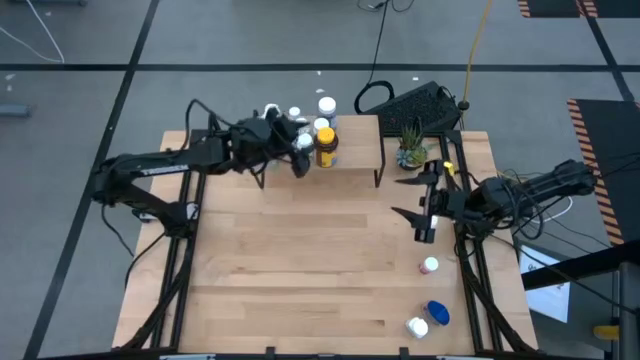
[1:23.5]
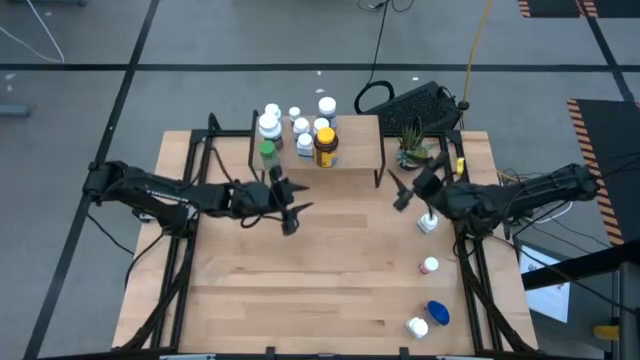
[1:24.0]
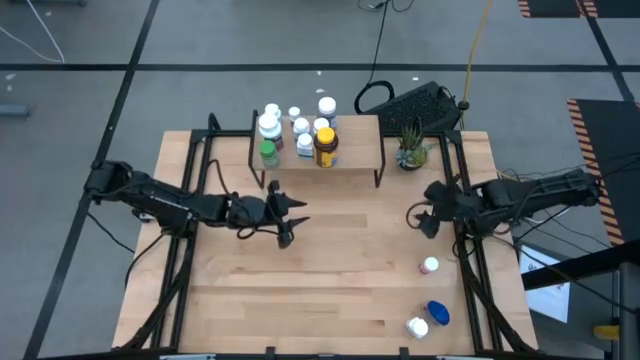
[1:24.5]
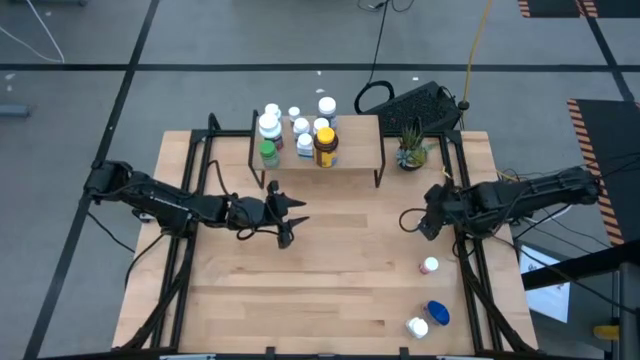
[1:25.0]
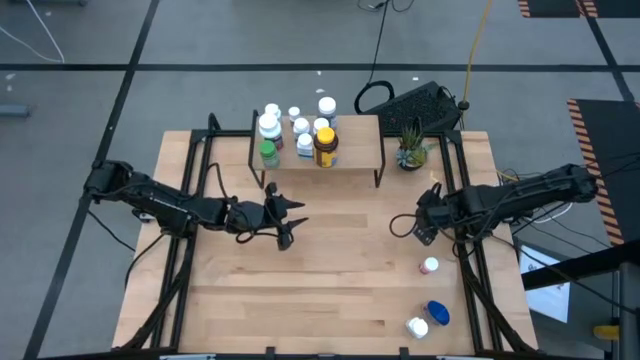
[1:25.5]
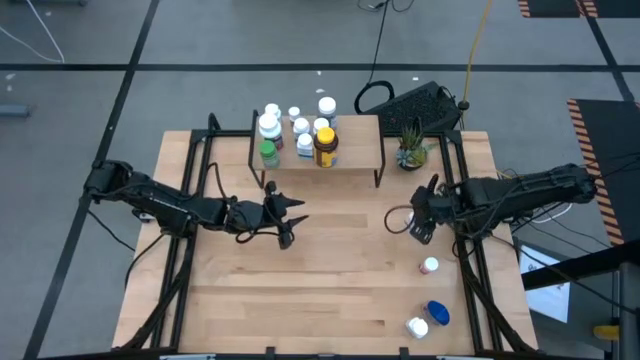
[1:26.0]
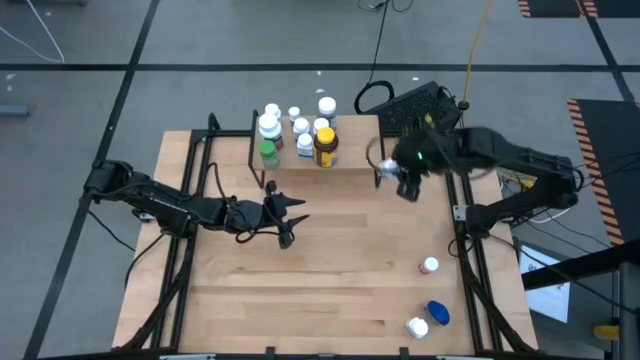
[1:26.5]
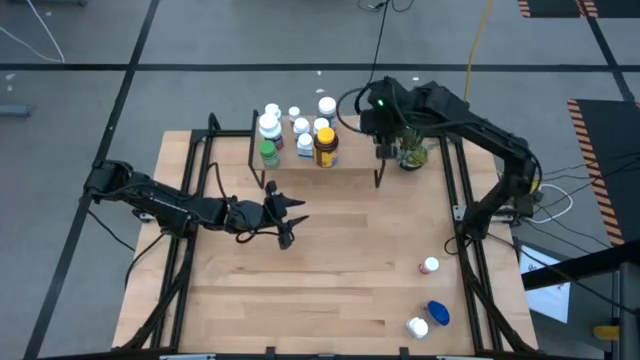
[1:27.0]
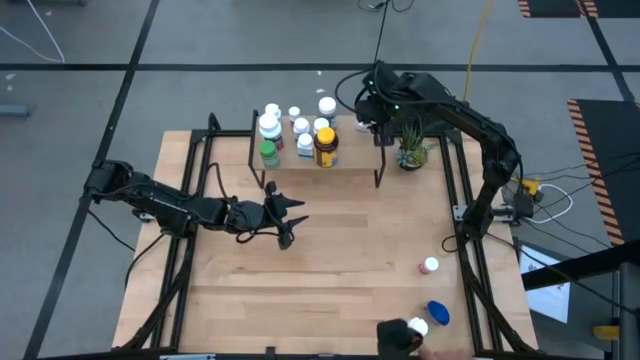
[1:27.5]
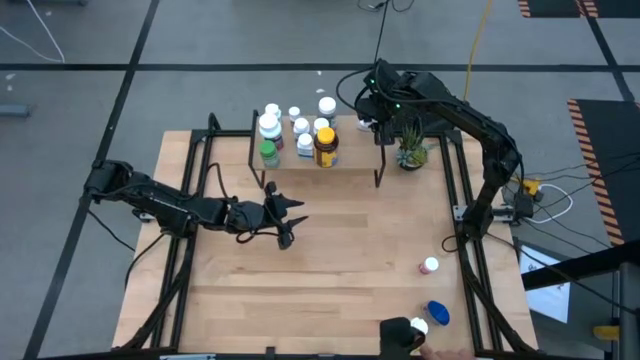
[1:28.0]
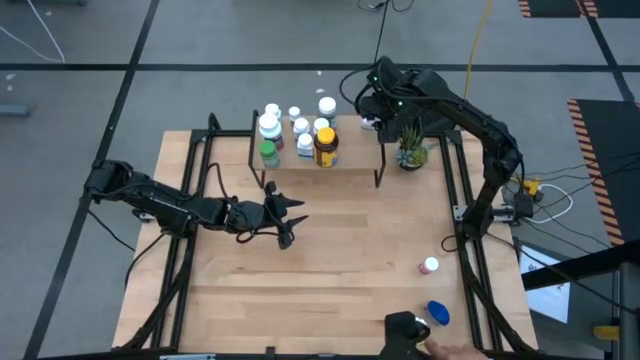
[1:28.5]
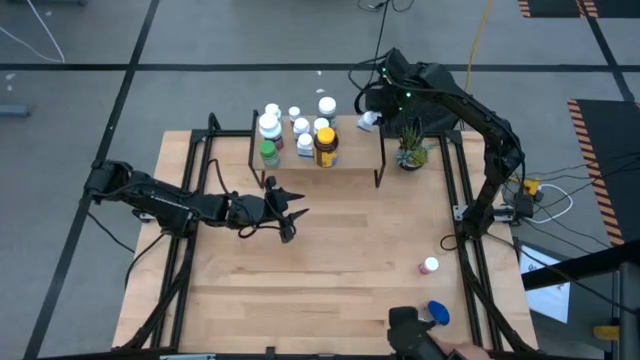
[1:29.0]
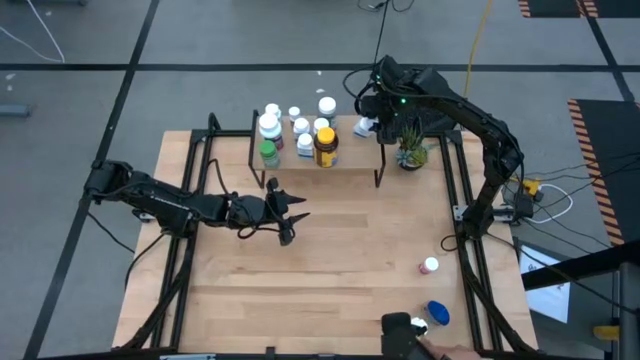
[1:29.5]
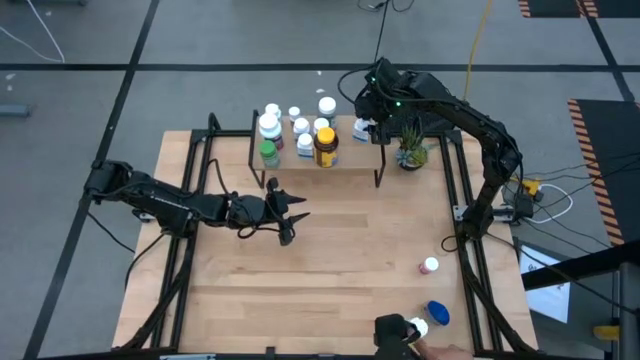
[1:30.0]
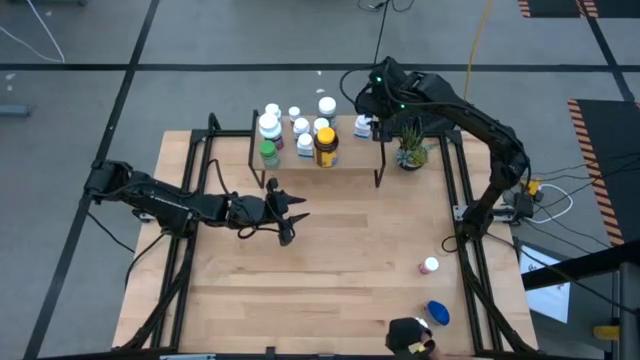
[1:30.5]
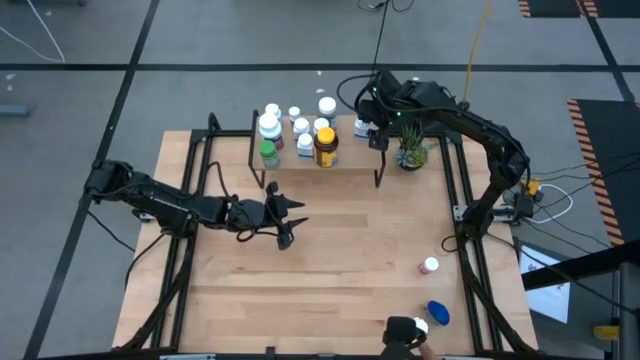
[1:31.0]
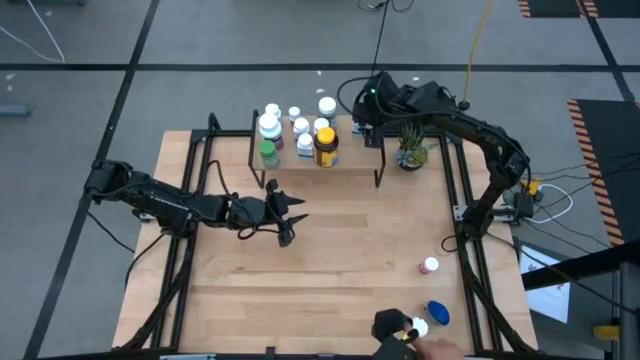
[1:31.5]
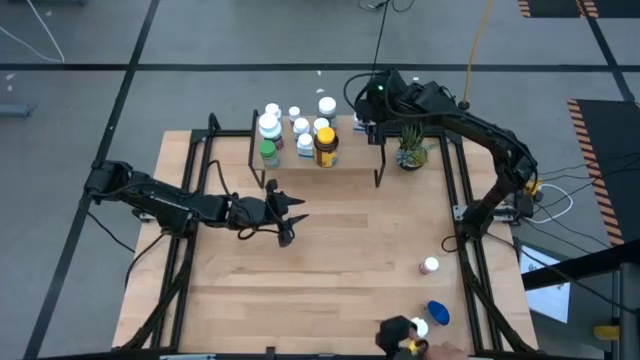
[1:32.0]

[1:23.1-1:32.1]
Task: Pick and place medicine bottles onto shelf by color
Put the white pill bottle on the shelf

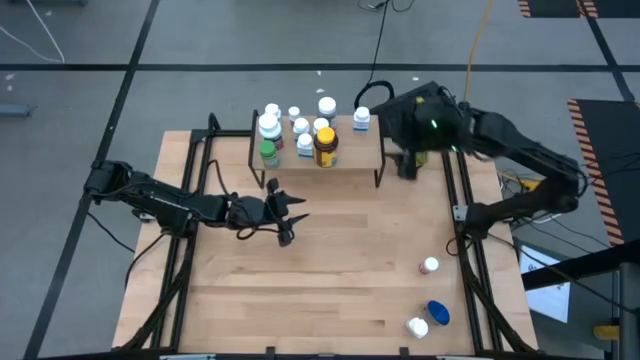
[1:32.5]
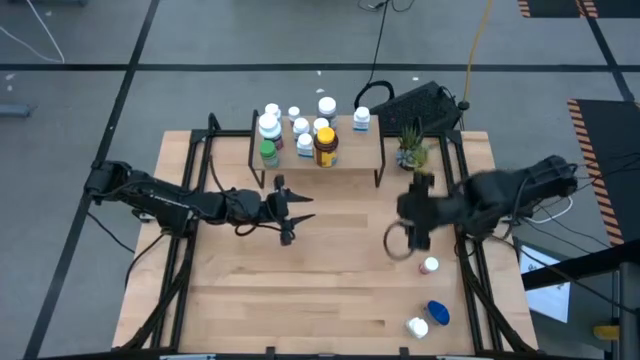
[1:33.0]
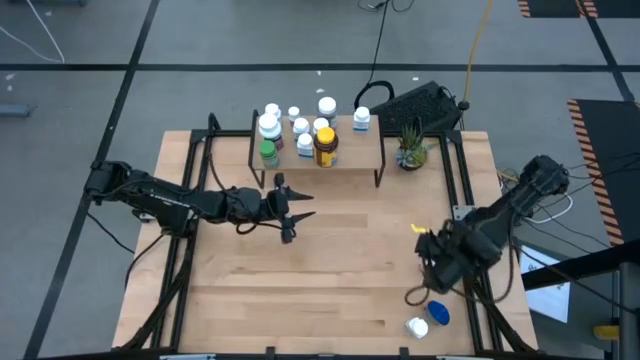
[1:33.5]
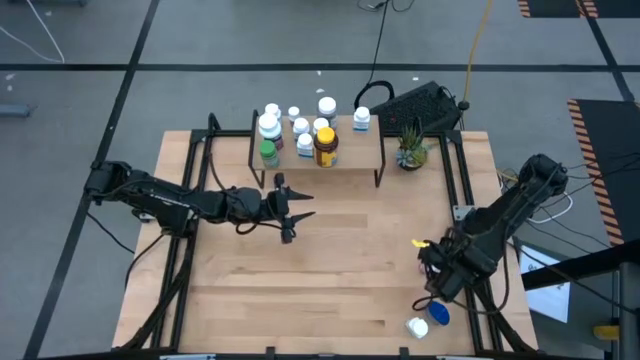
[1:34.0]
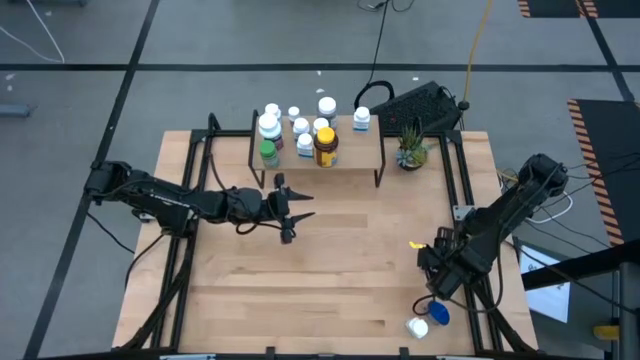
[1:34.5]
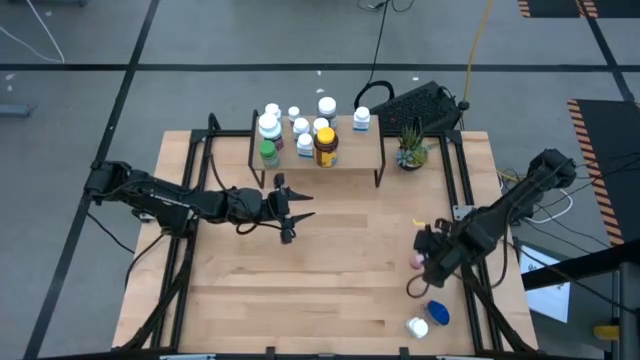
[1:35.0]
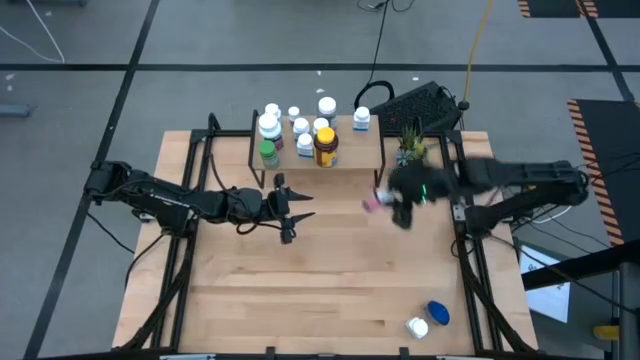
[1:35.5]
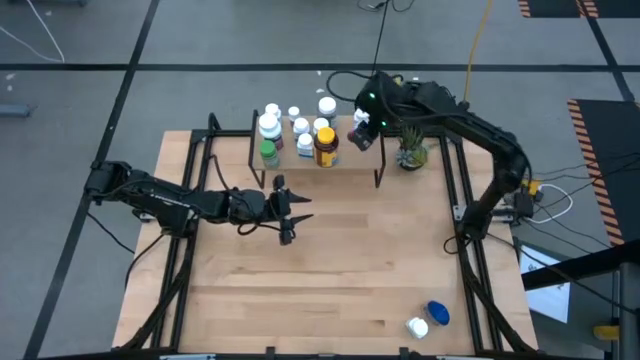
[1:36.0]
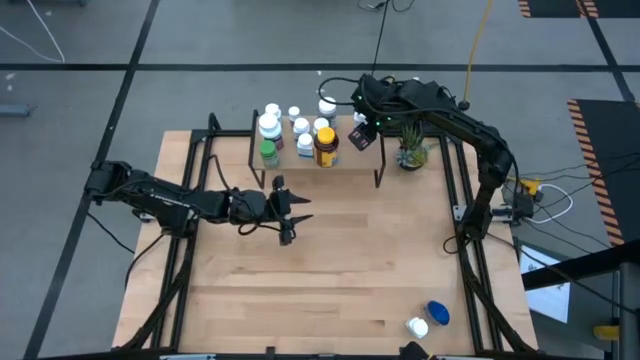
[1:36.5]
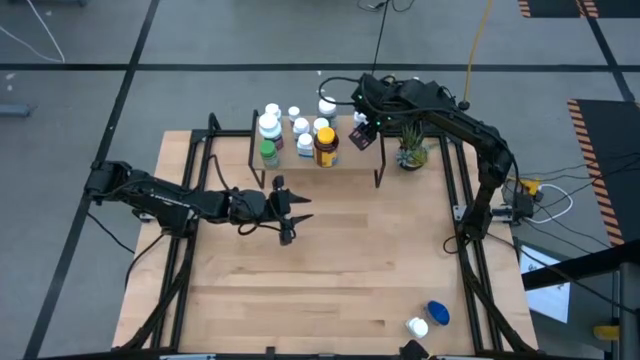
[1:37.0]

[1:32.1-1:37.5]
Put the pink pill bottle on the shelf

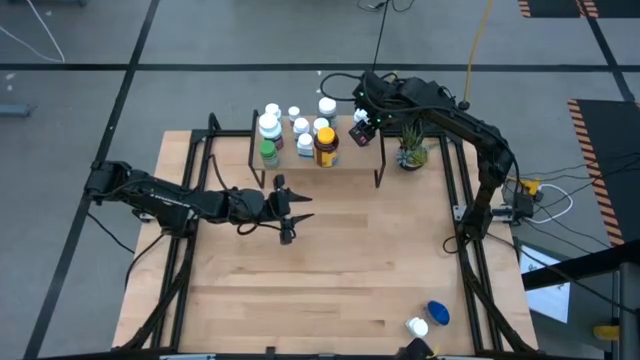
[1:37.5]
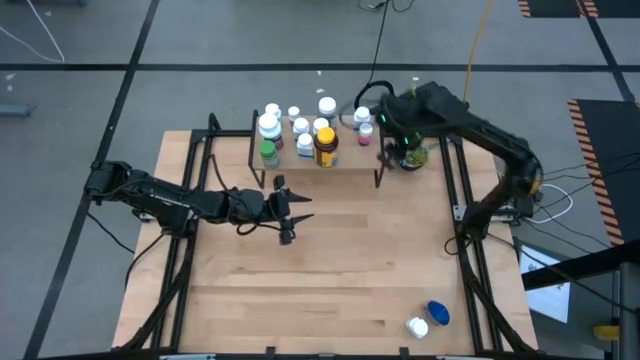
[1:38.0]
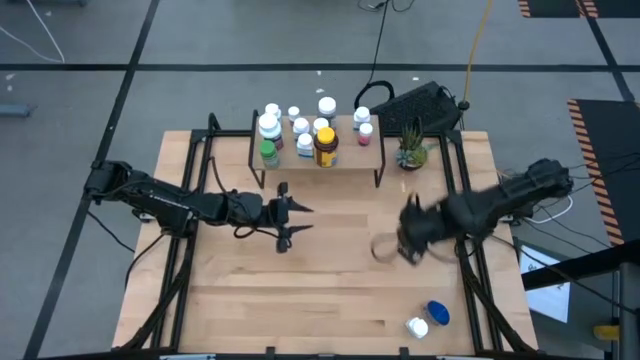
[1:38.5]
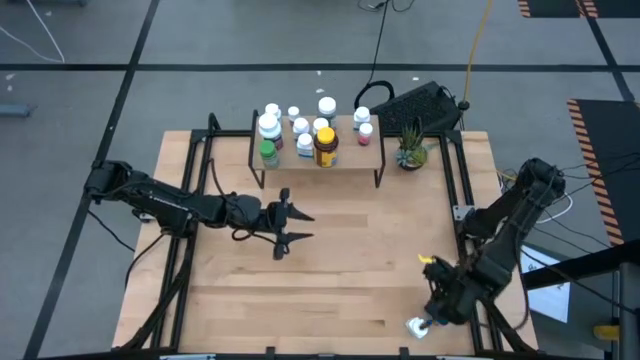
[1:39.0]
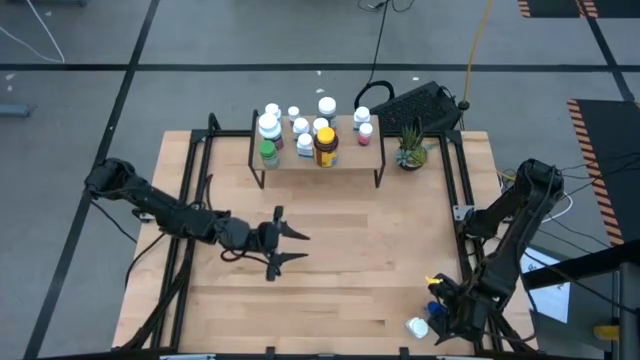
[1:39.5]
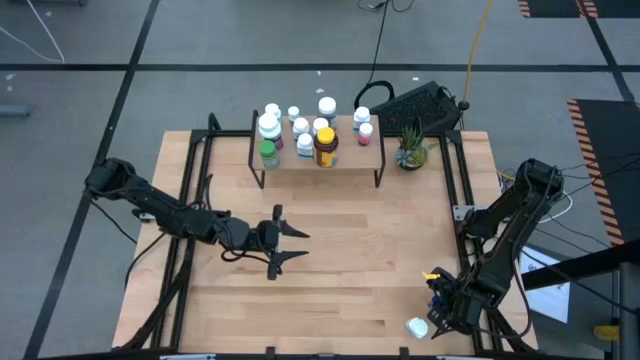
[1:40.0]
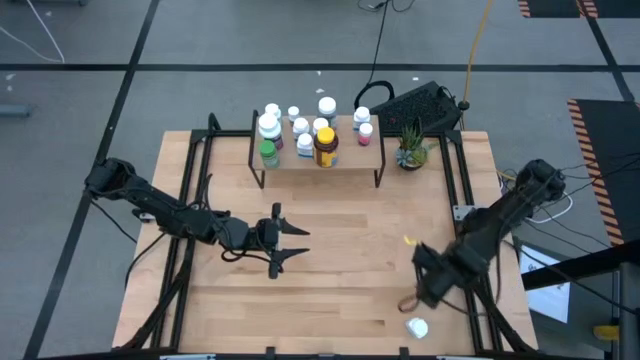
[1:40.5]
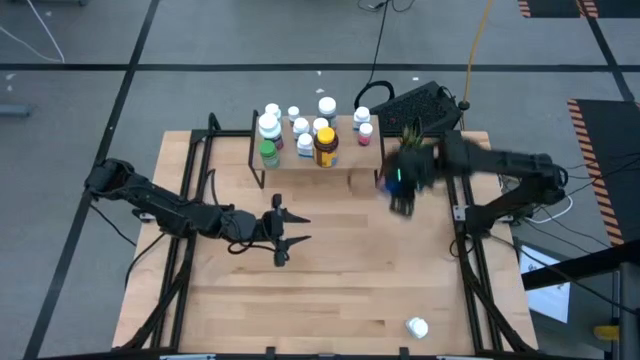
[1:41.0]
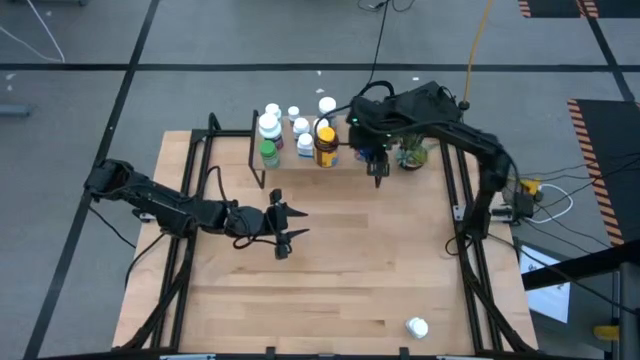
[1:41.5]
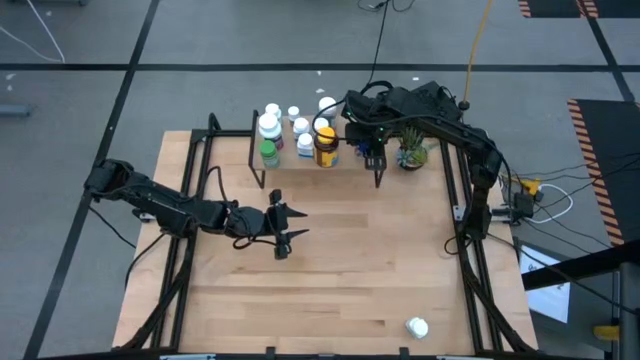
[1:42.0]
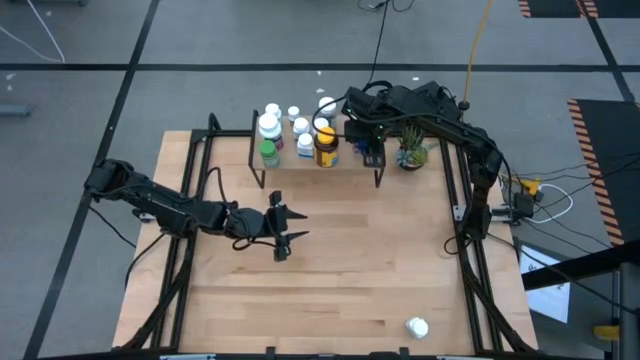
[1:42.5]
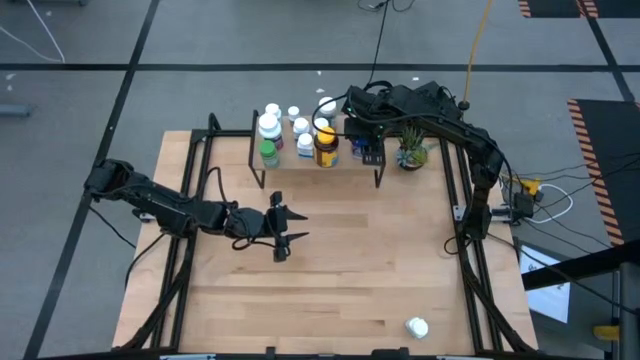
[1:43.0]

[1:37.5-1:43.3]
Put the blue pill bottle on the shelf

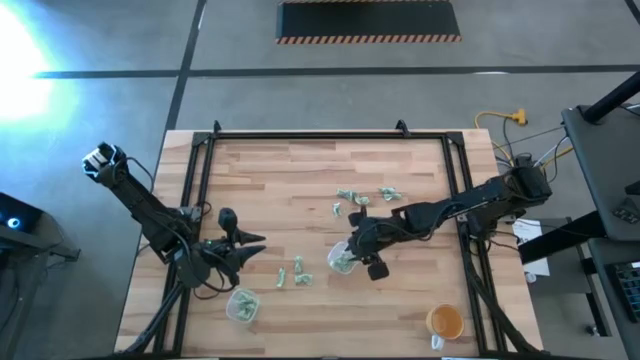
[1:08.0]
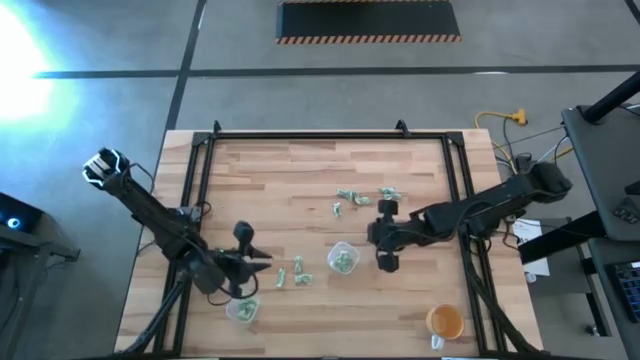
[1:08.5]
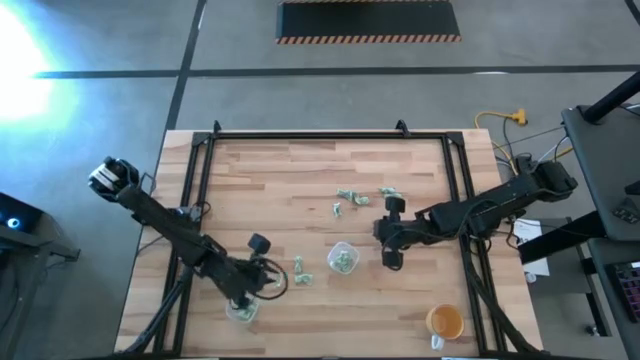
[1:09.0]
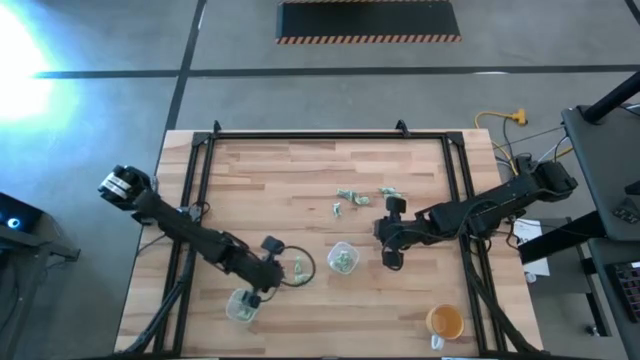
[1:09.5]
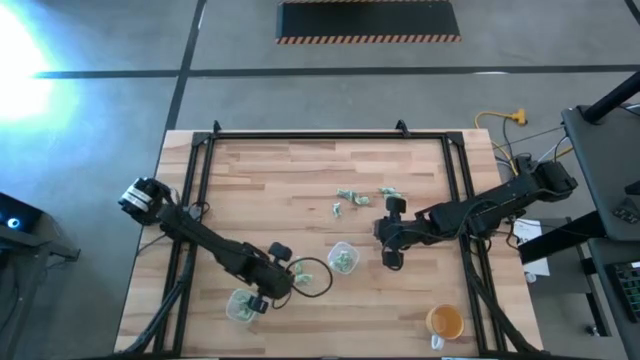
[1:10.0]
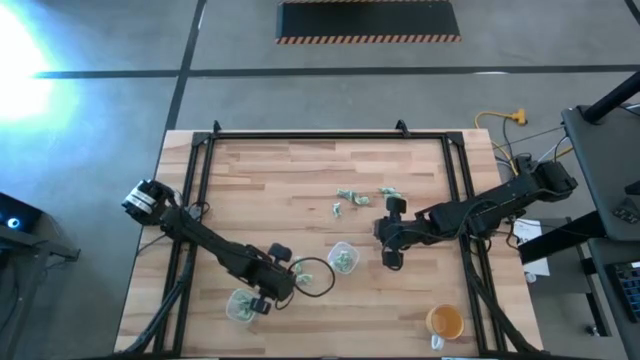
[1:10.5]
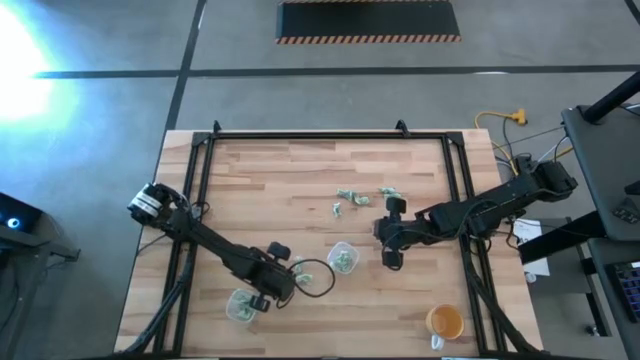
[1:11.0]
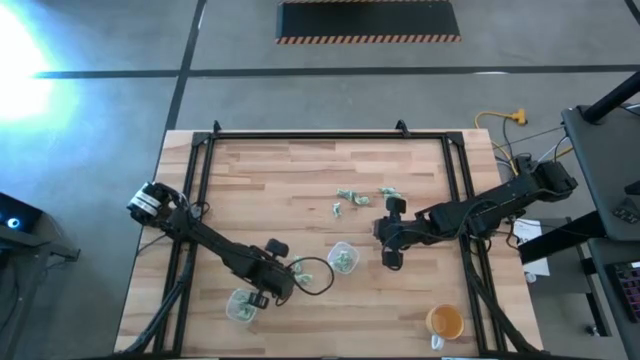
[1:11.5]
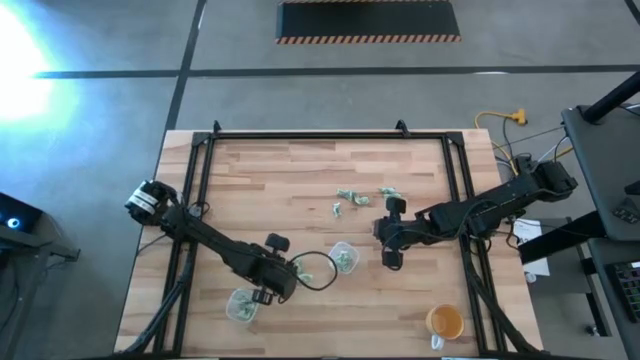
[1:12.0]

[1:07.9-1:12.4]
Task: Pick and place items into bin
Put the light green packet into the bottom transparent bin
